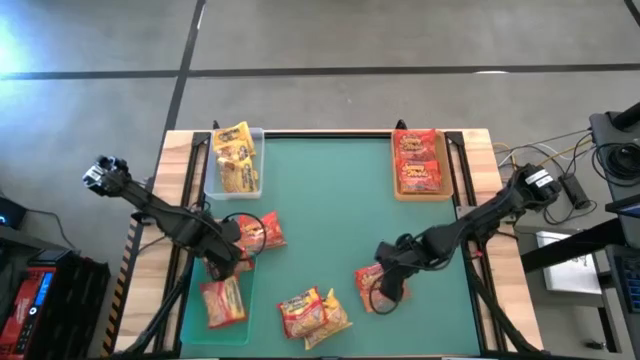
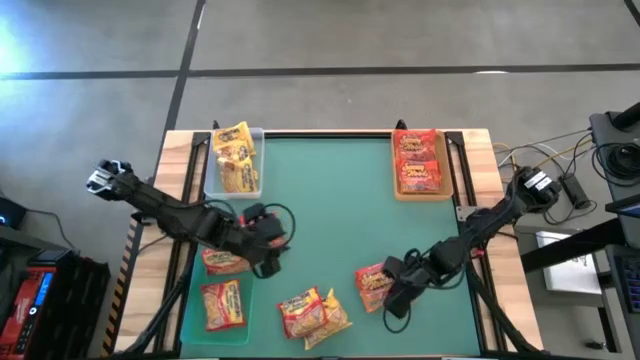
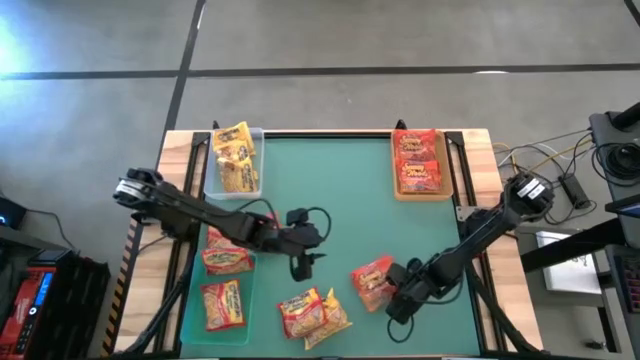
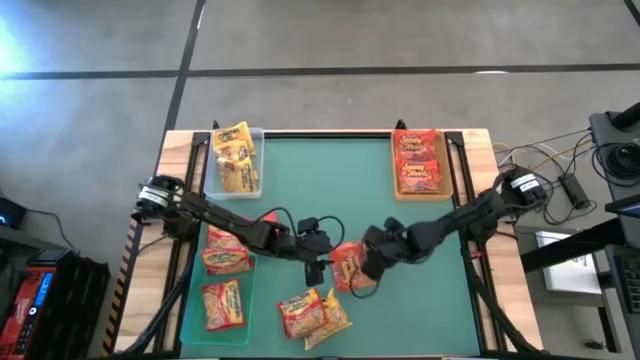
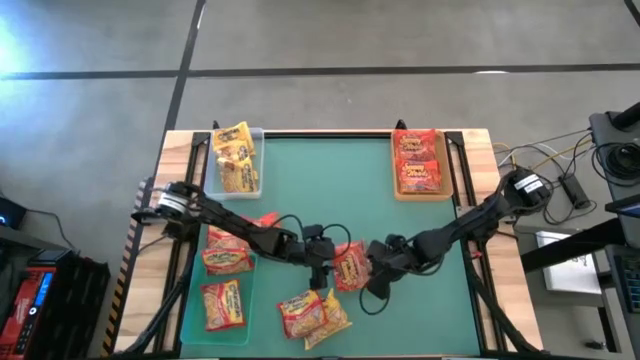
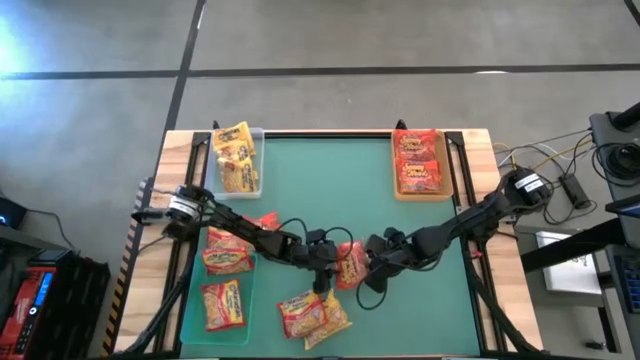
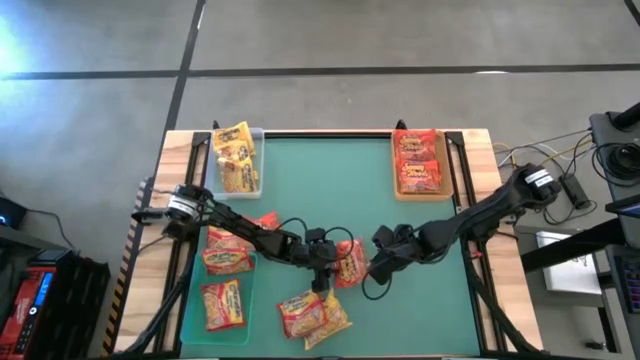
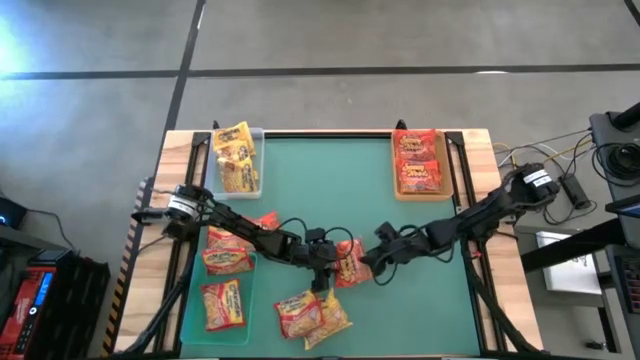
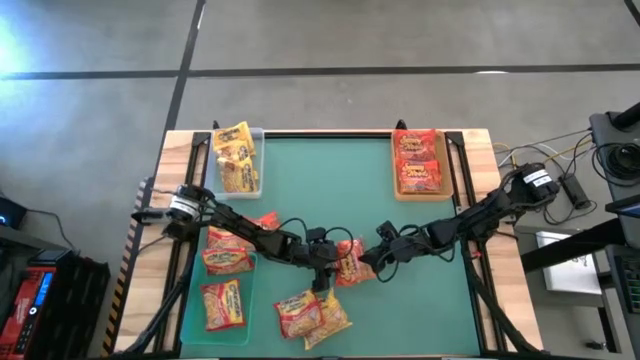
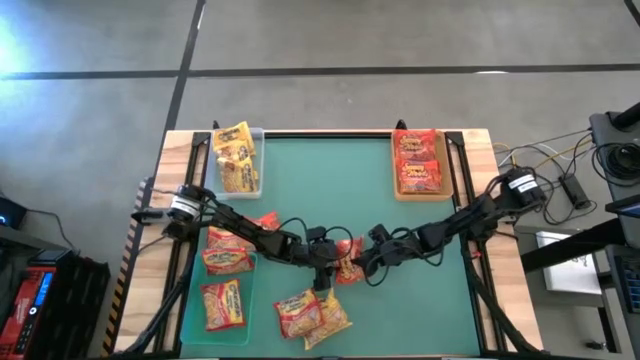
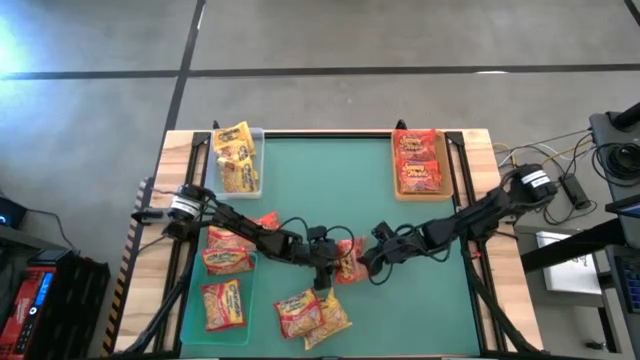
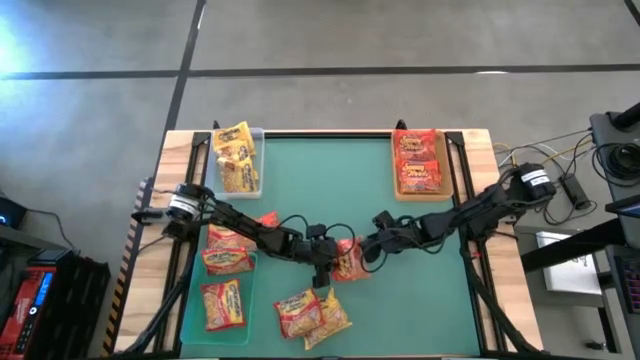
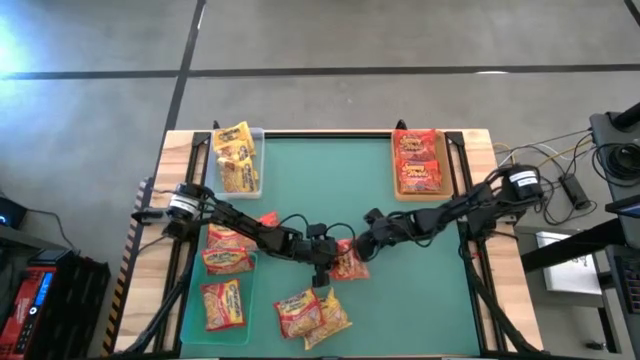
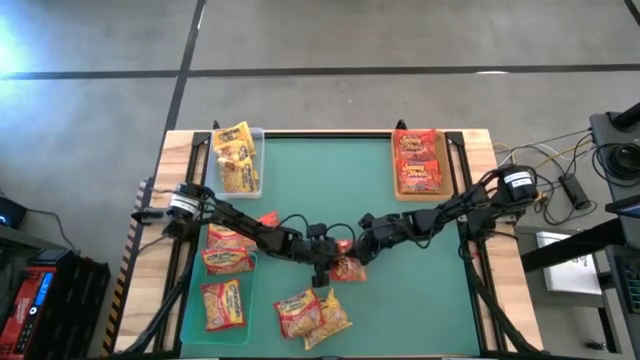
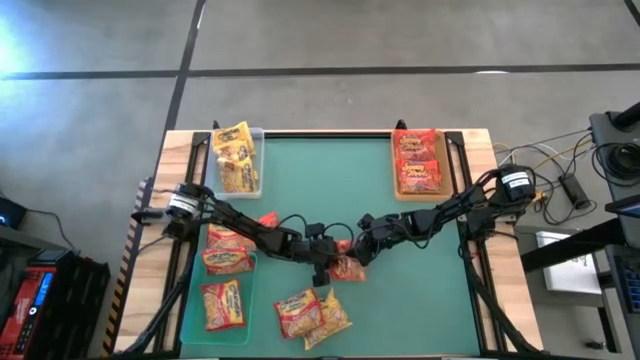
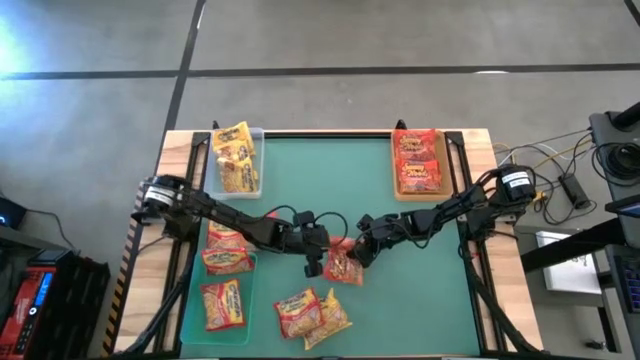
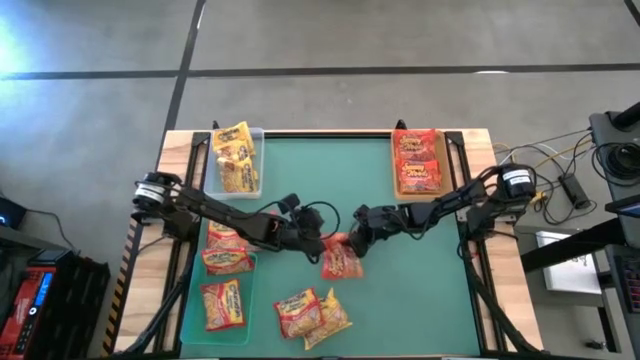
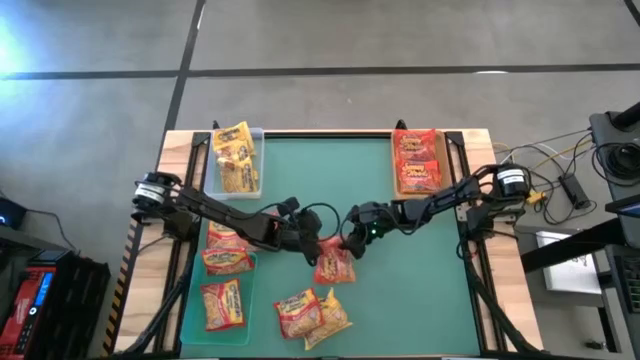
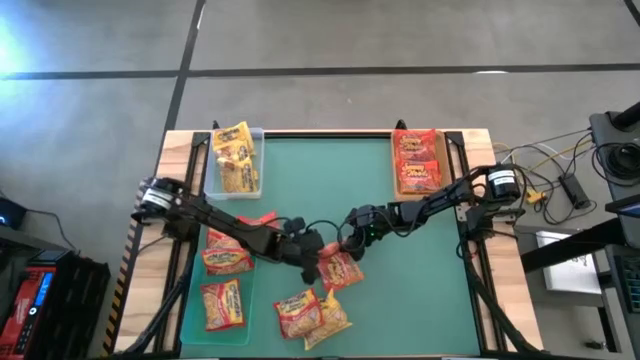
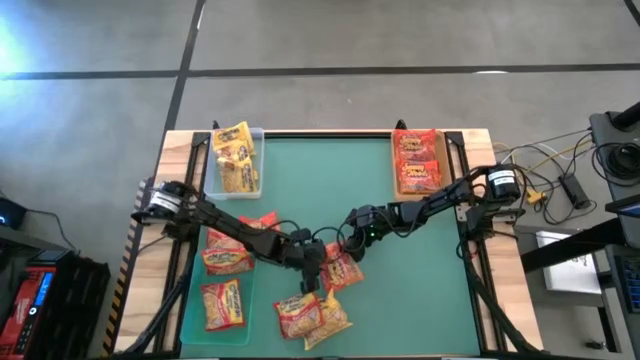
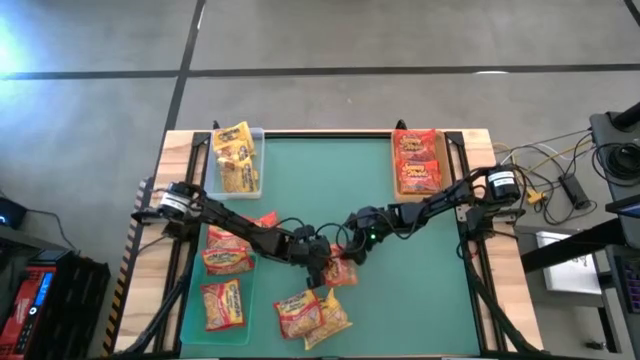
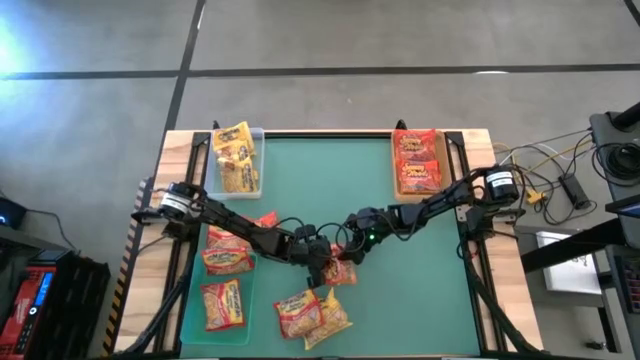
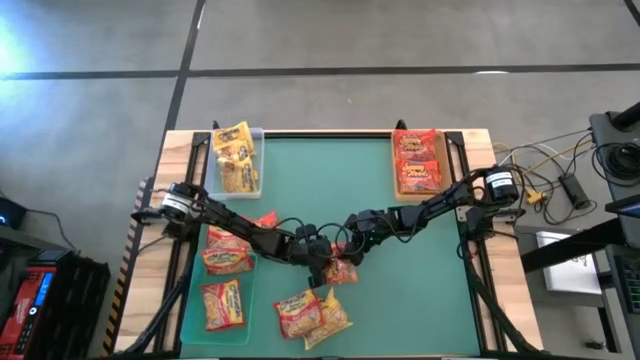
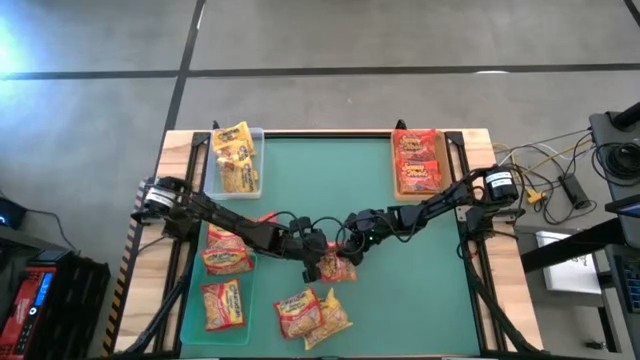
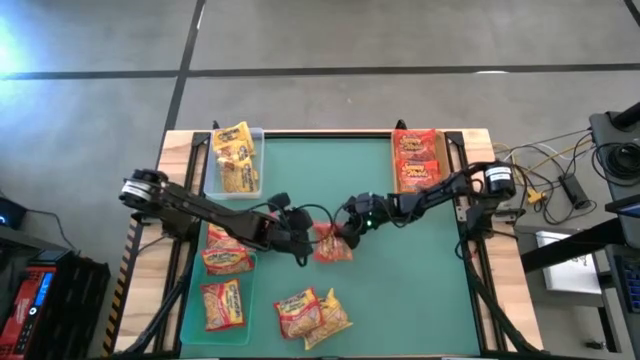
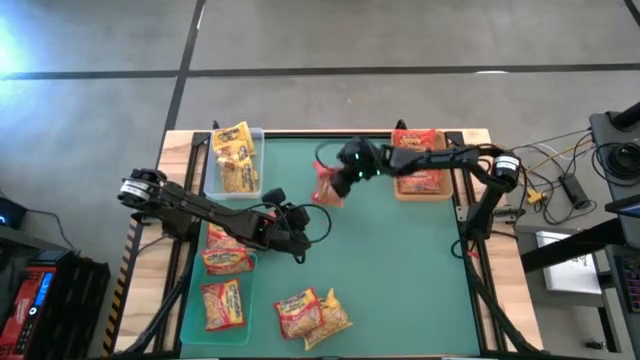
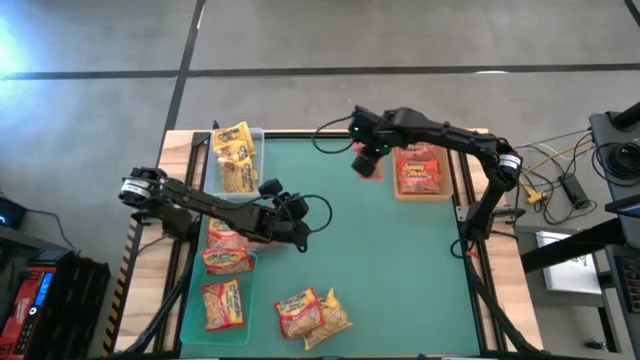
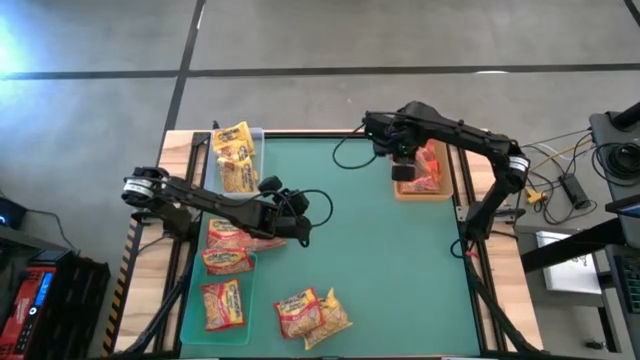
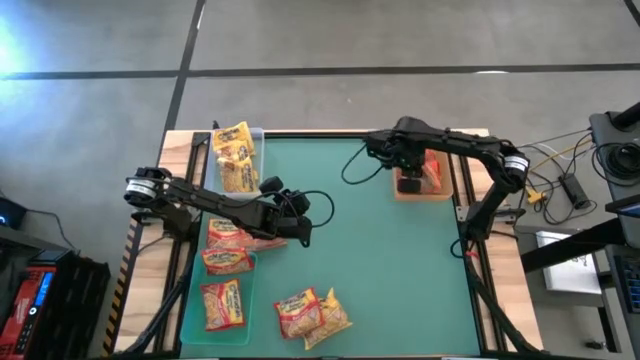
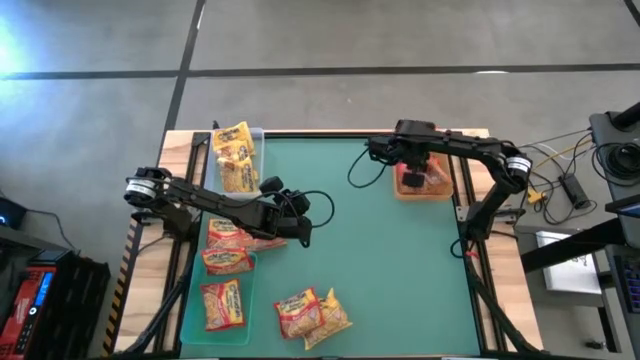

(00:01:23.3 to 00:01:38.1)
Task: Sort Maruchan noodles
Put the orange noodle pack into the orange bin

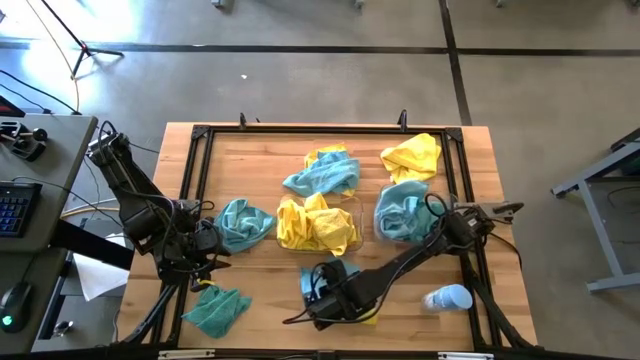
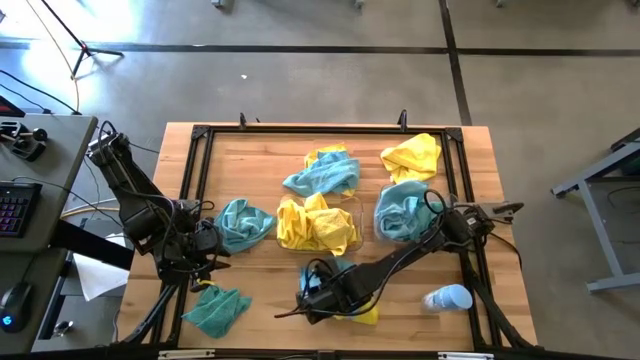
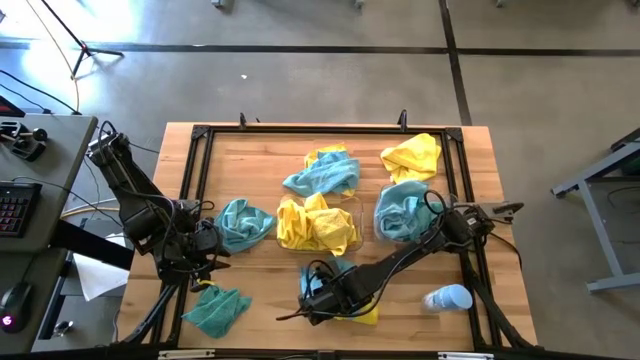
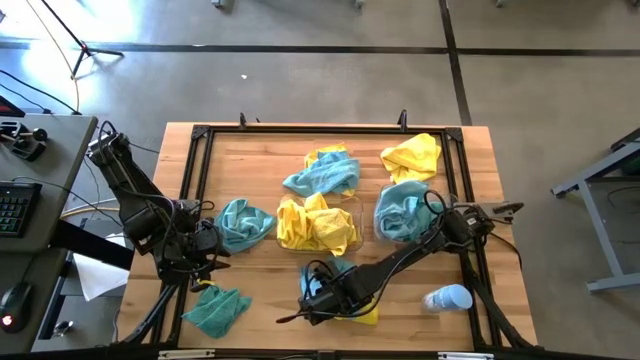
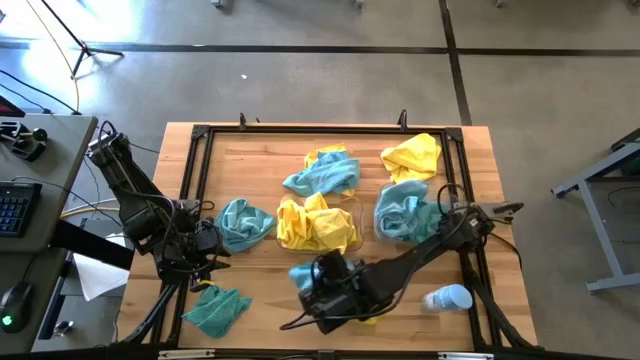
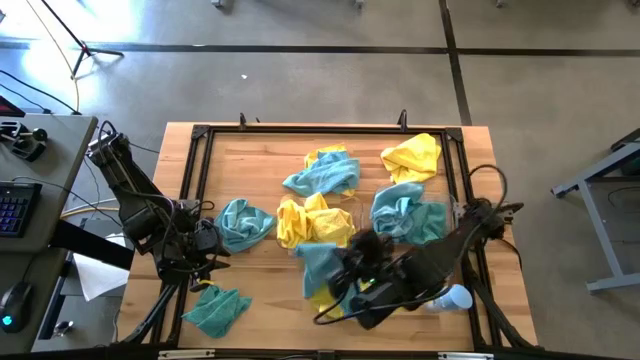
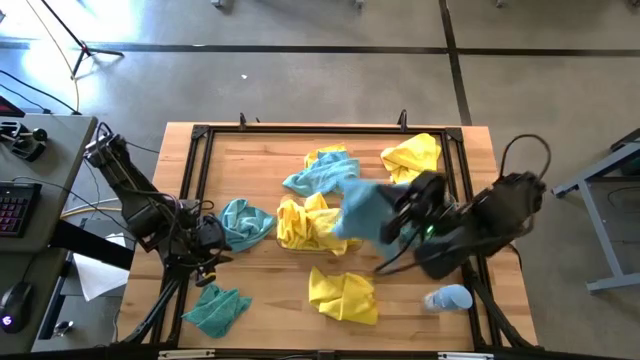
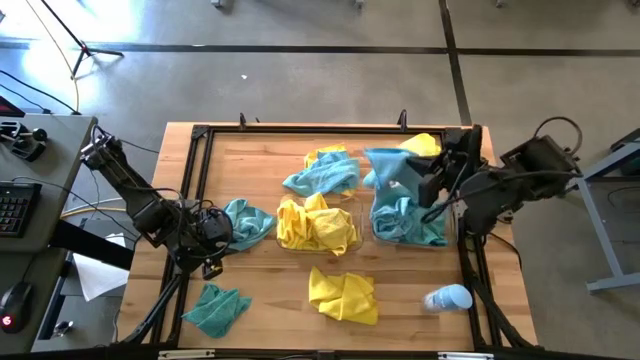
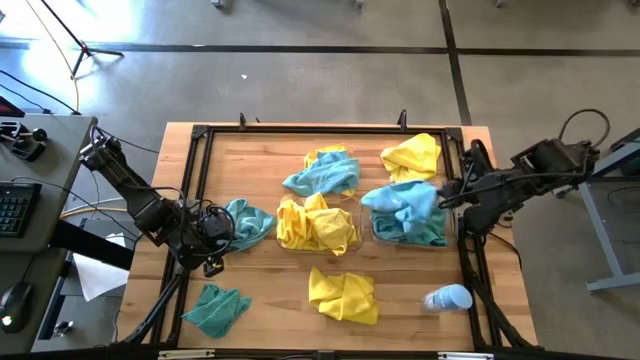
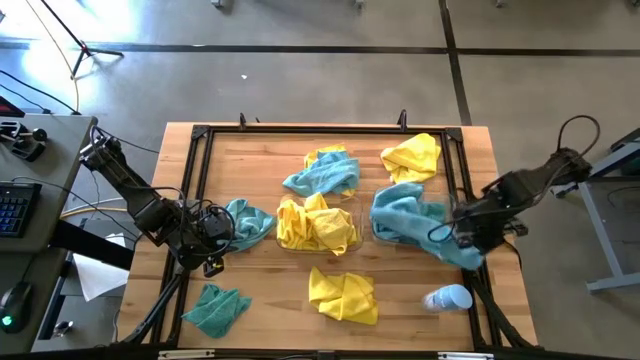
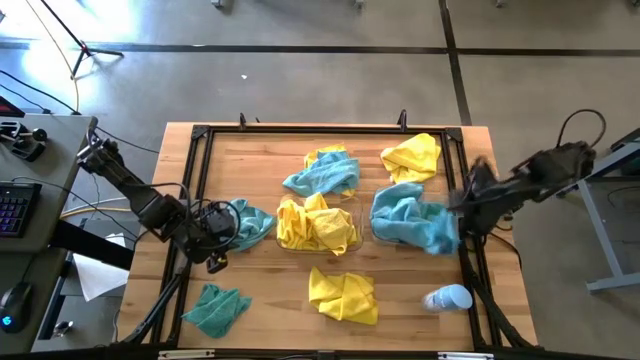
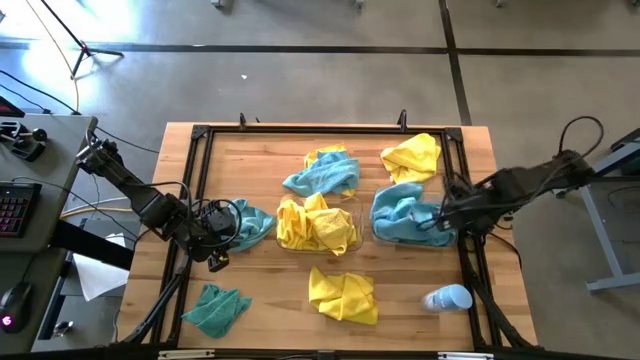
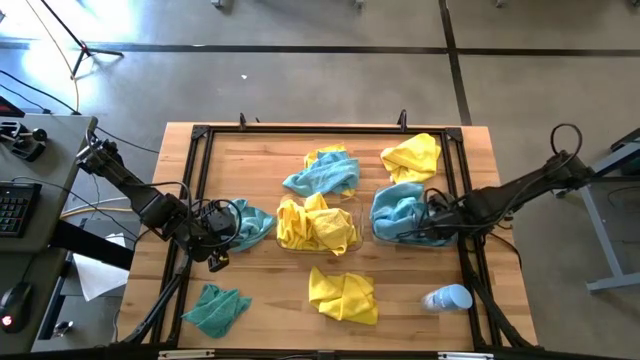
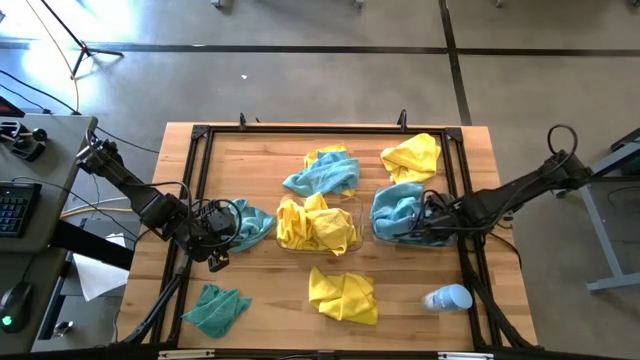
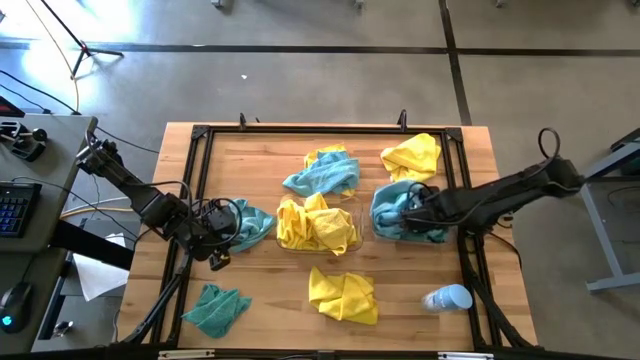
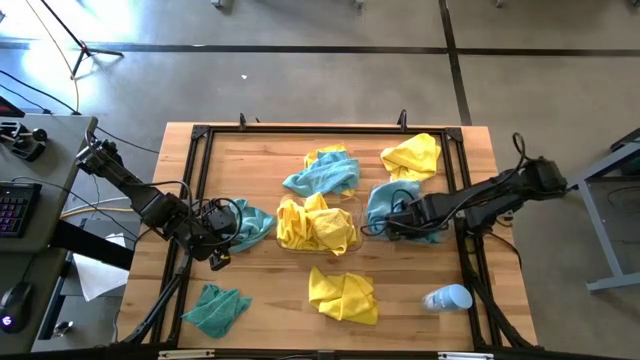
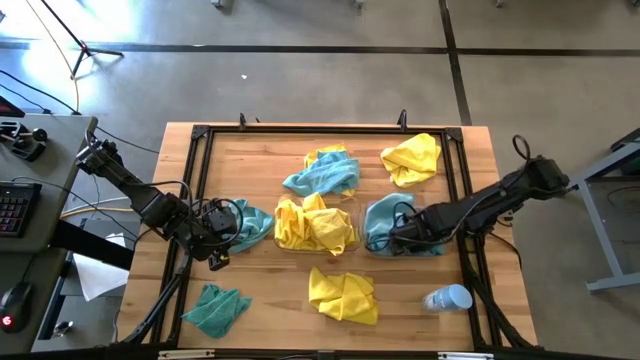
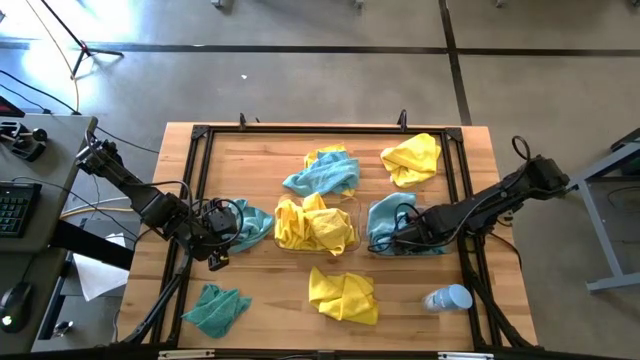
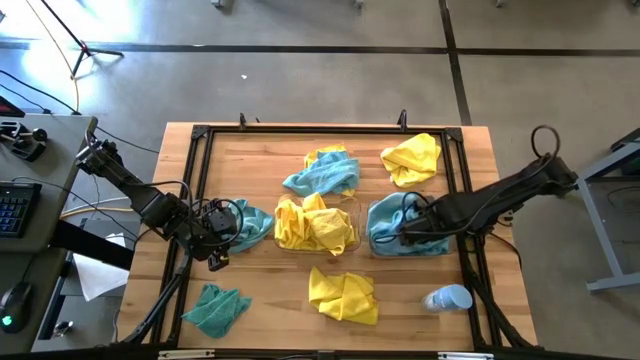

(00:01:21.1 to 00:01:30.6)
Task: Sort microfiber towel by color & place in baskets
Put the blue microfiber cloth into the right transparent bin
